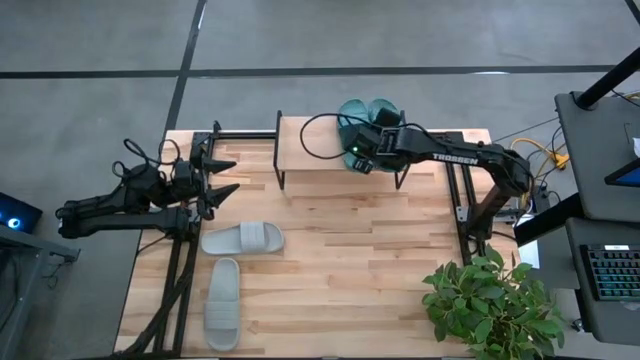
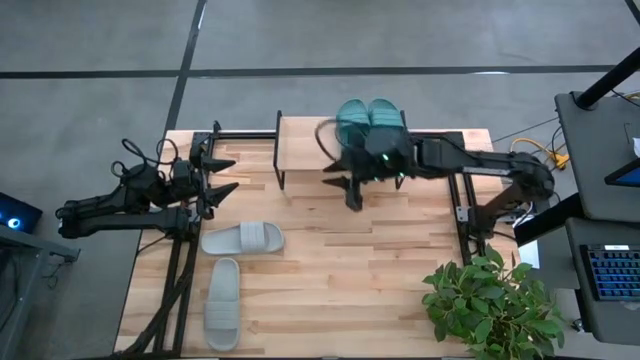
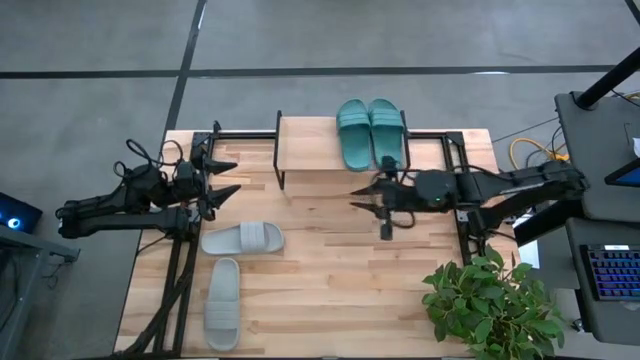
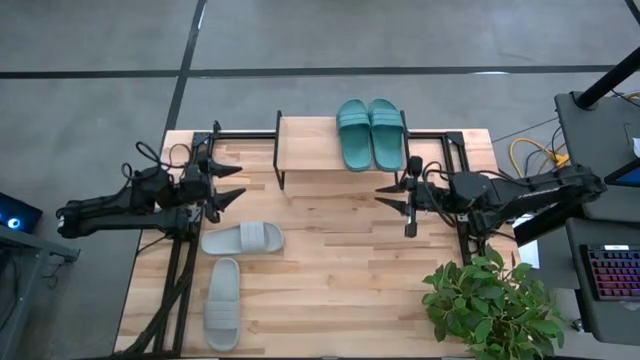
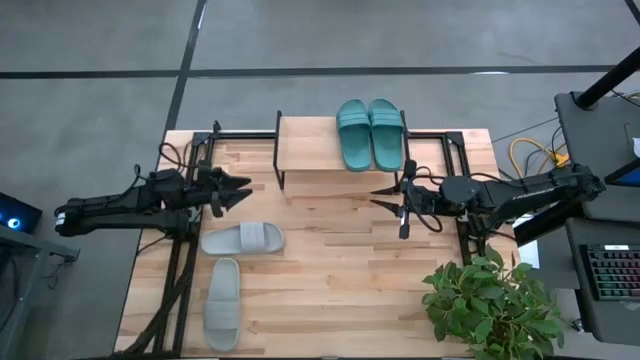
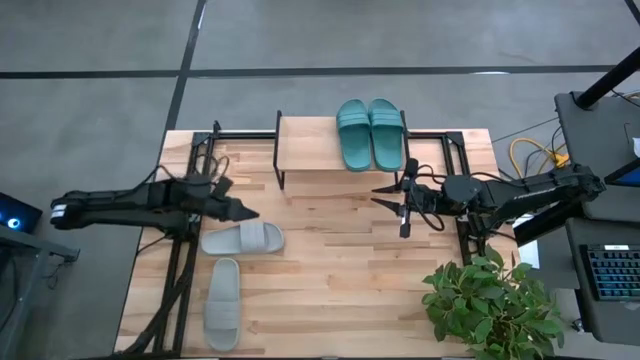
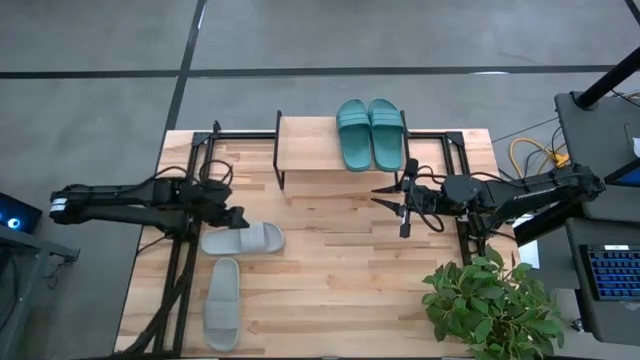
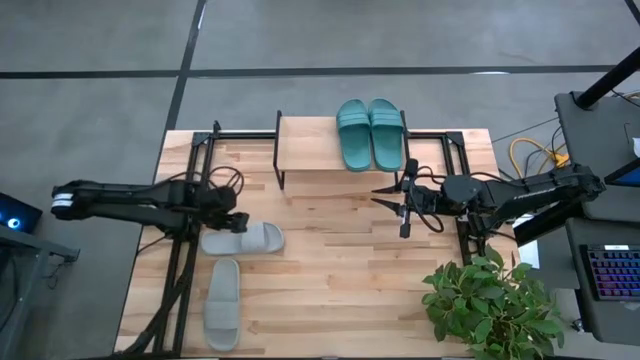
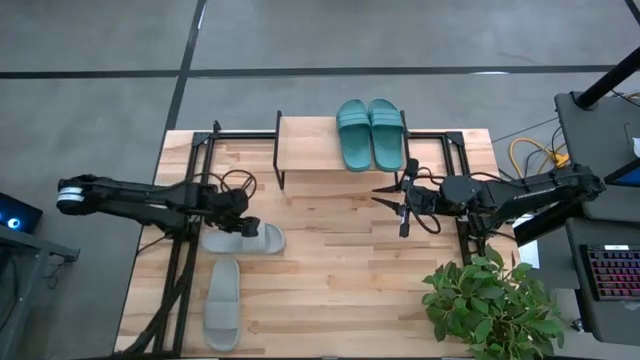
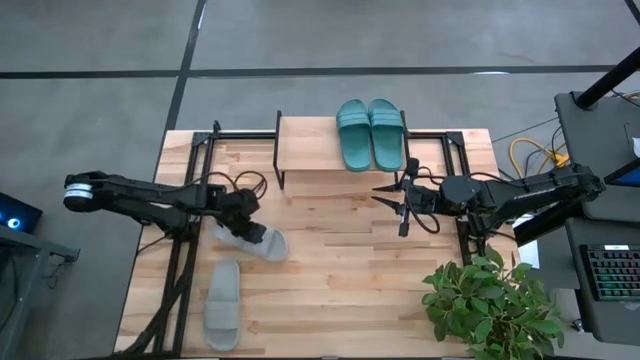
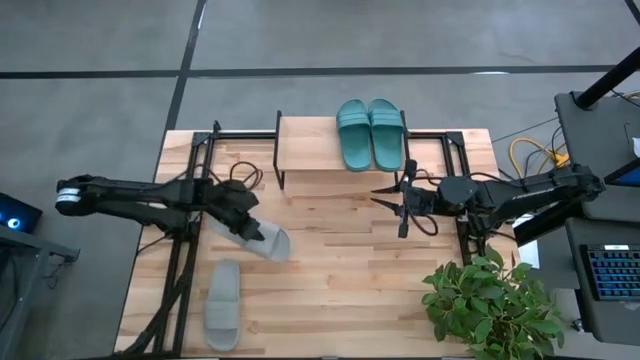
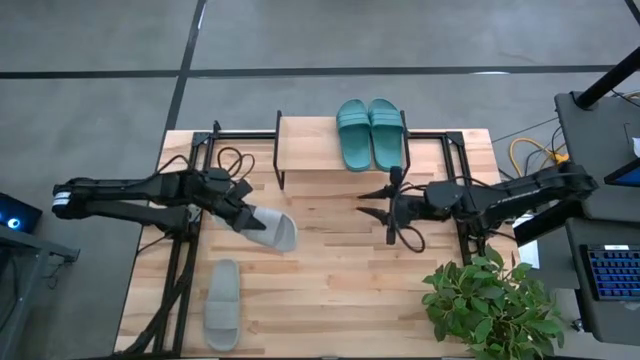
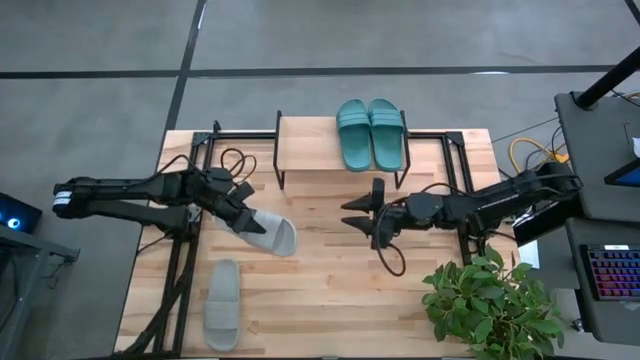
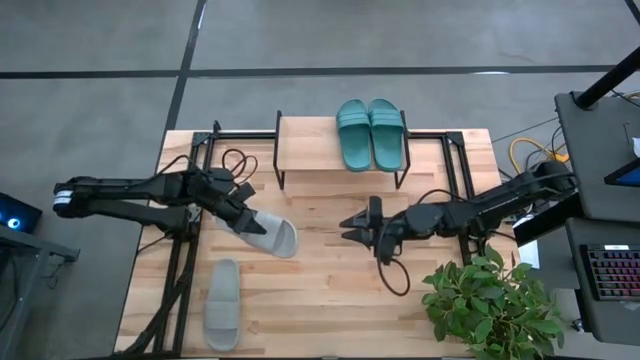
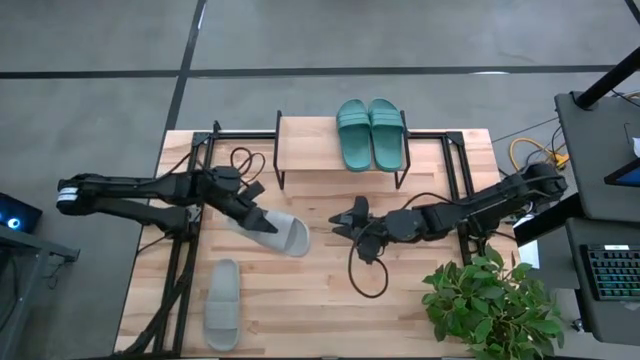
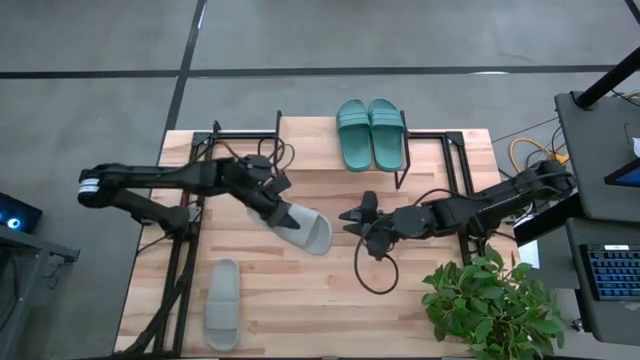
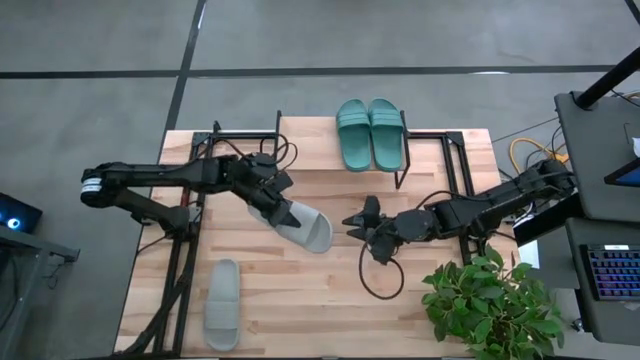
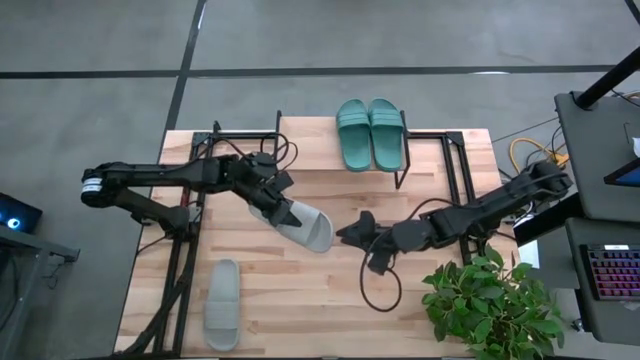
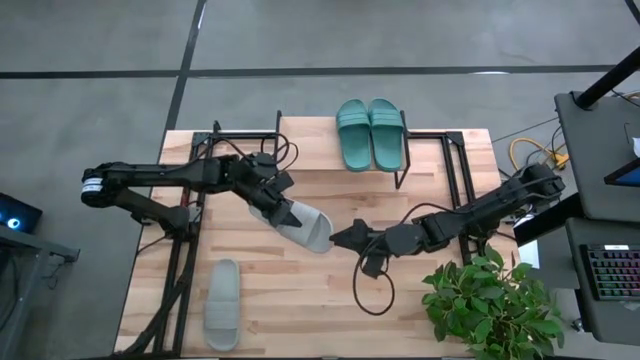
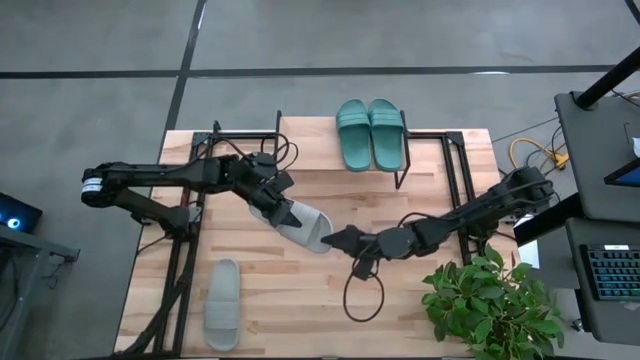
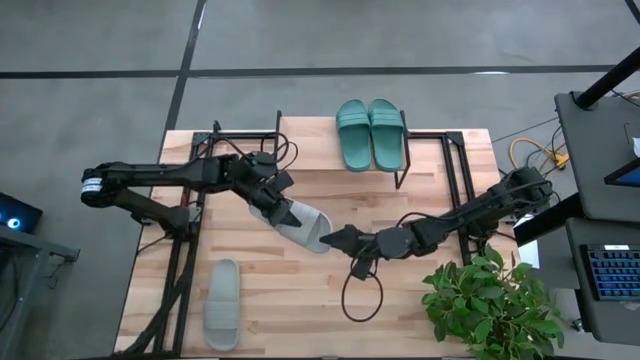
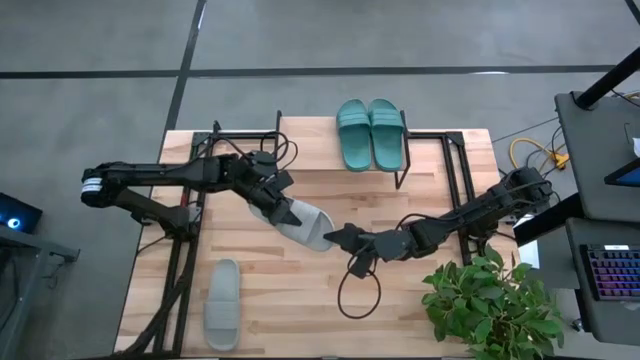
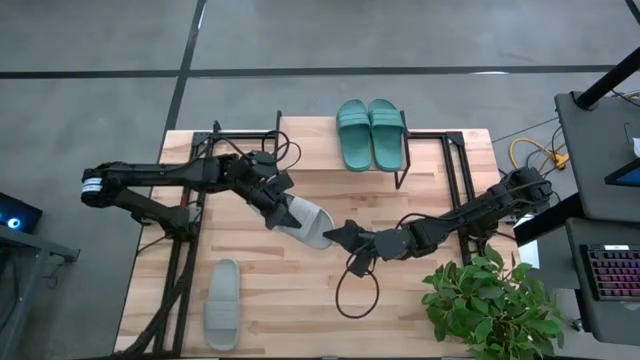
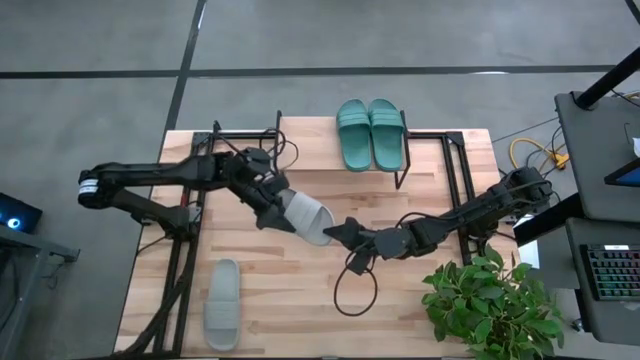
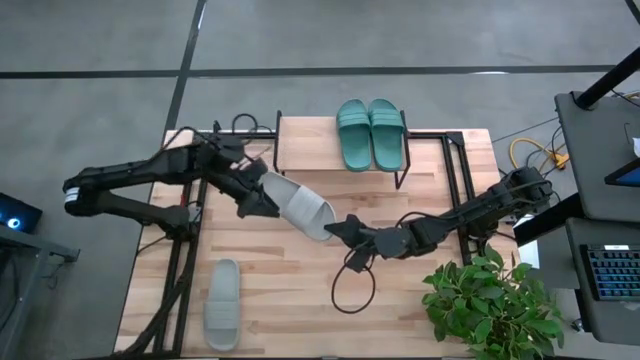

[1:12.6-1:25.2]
Task: Pick and place slides into the shelf
Put the top gray slide on the shelf

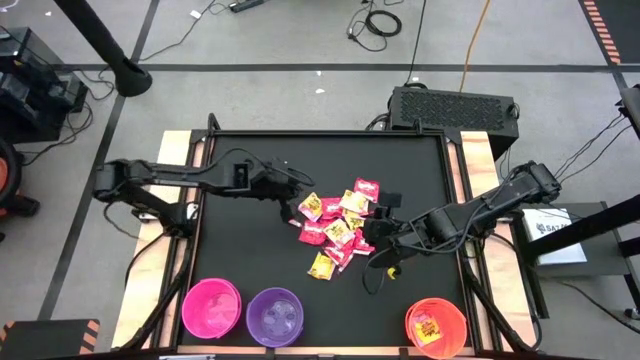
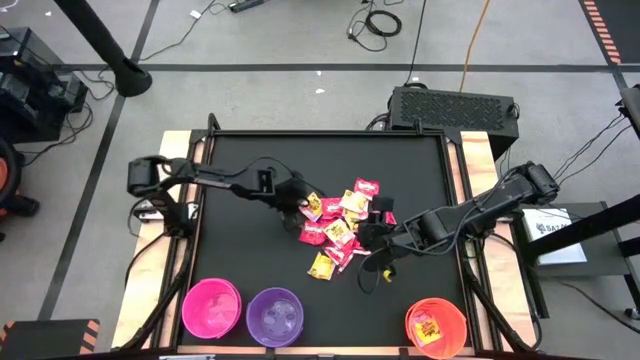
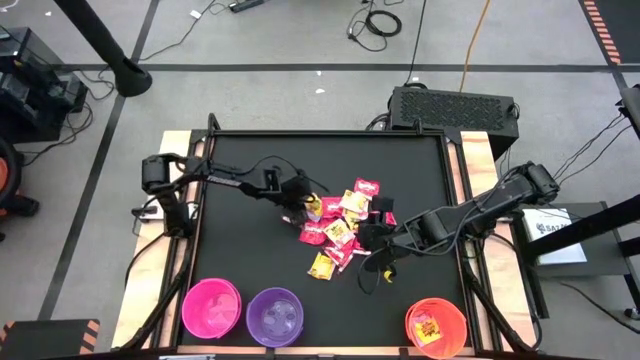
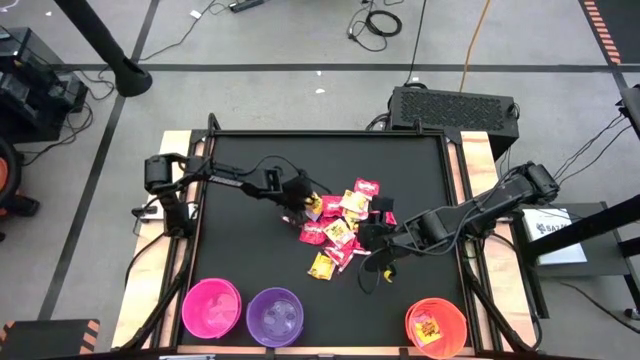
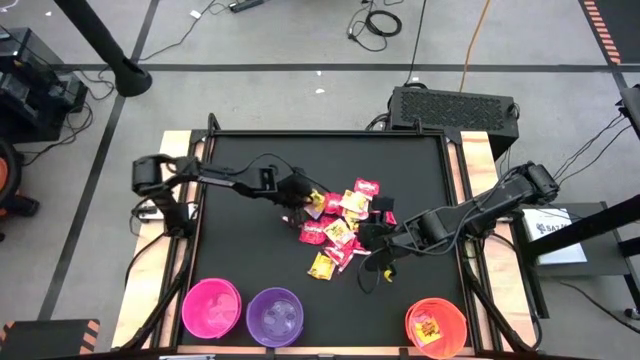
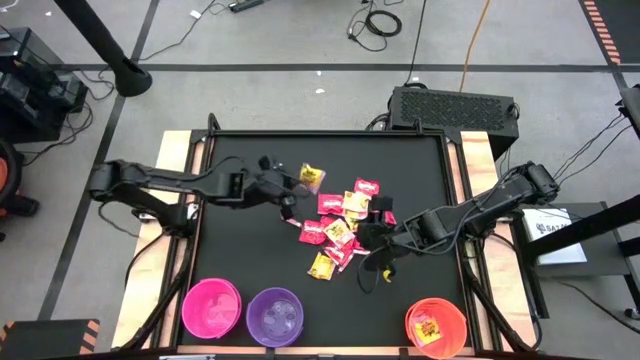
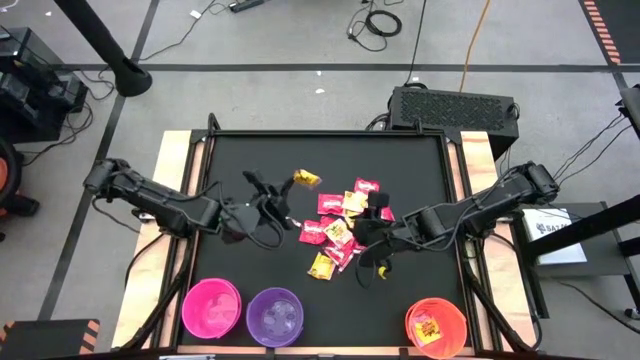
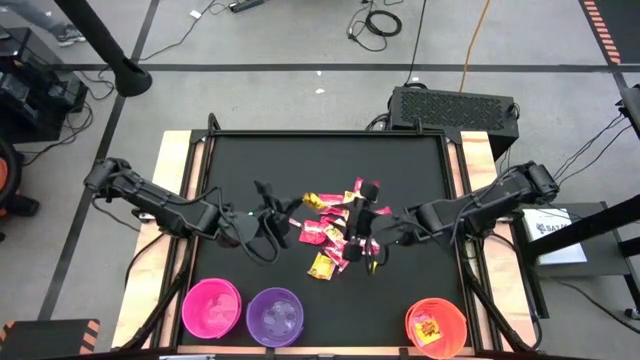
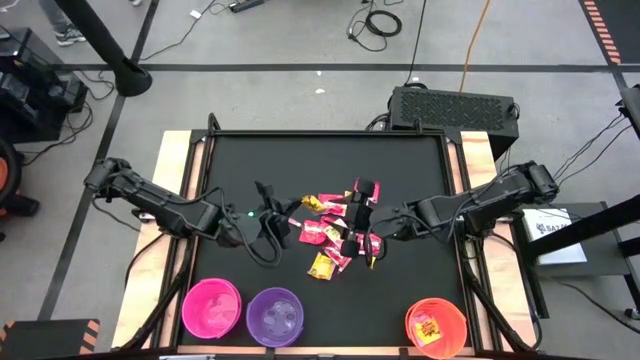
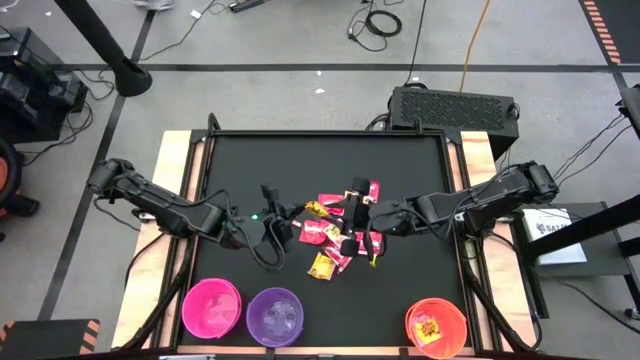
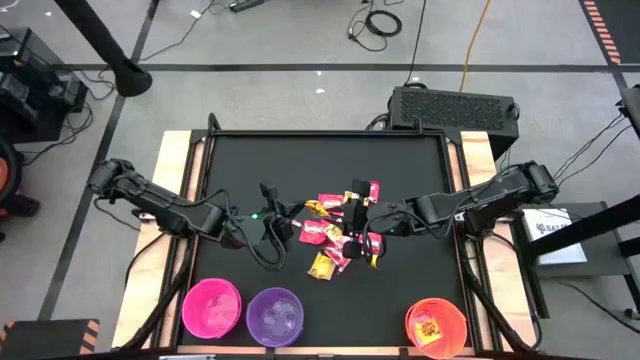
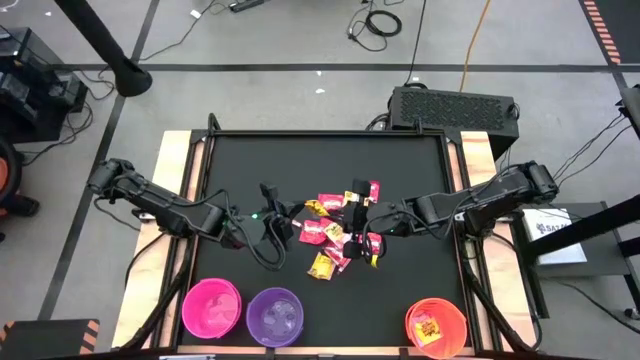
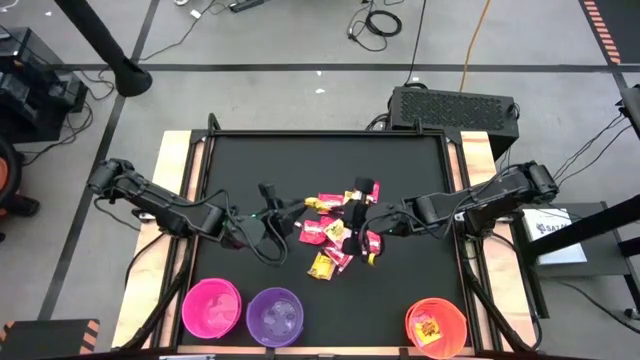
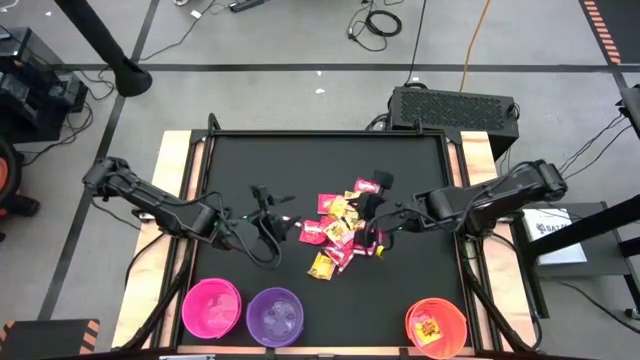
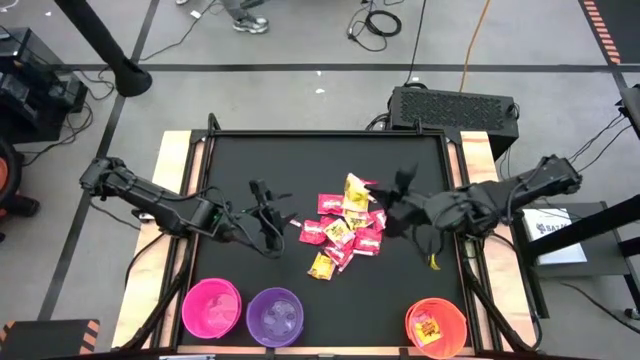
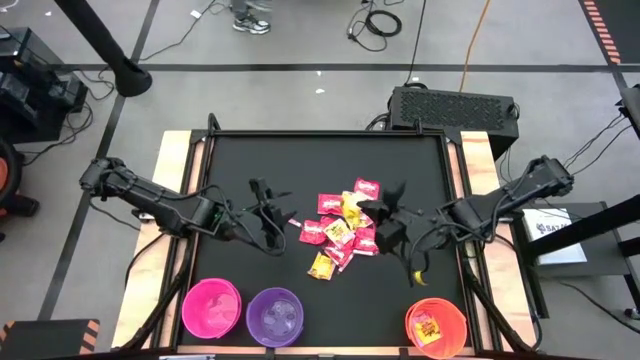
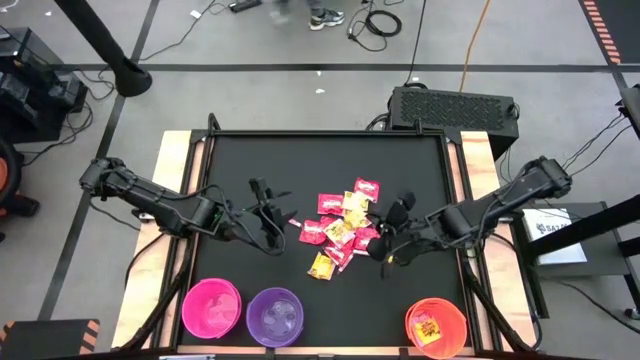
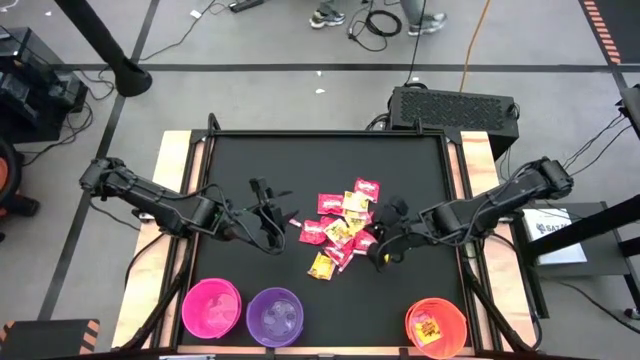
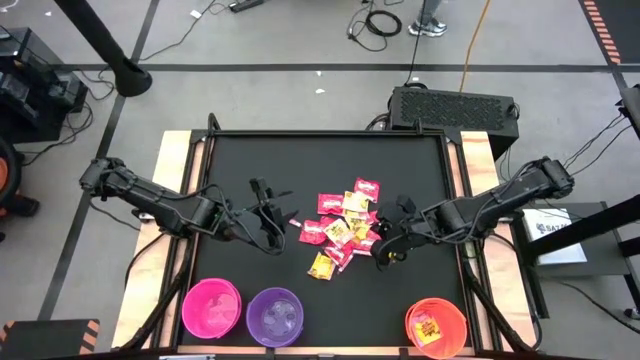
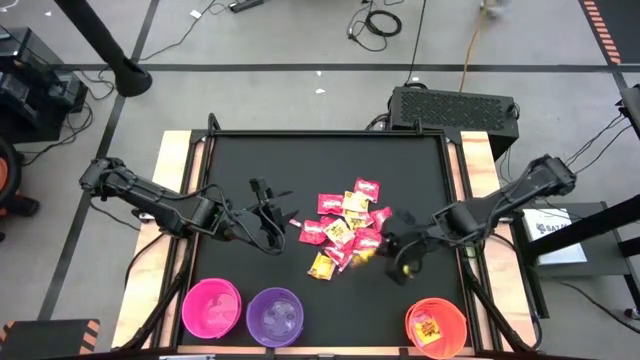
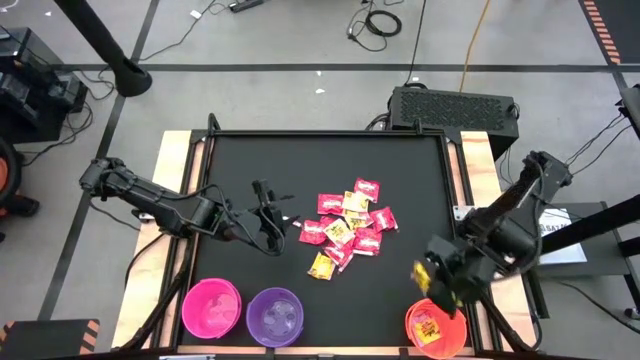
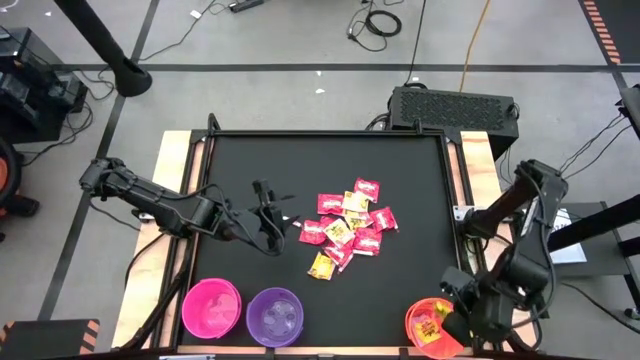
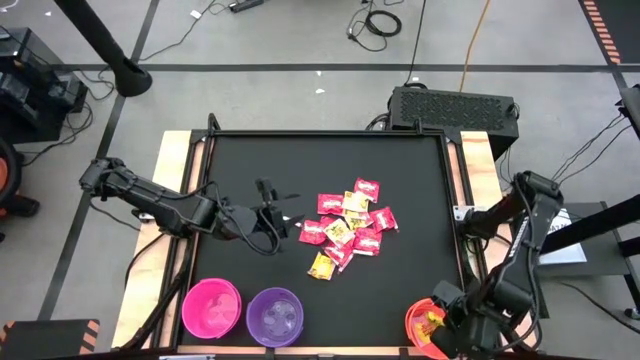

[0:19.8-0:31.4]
Task: Sort candy by brand, put in halloween buckets
Put the yellow candy into the orange bucket
